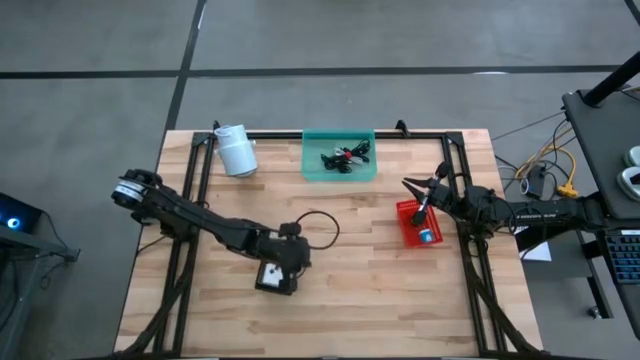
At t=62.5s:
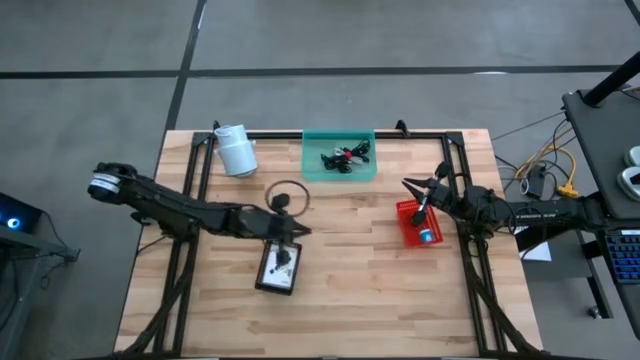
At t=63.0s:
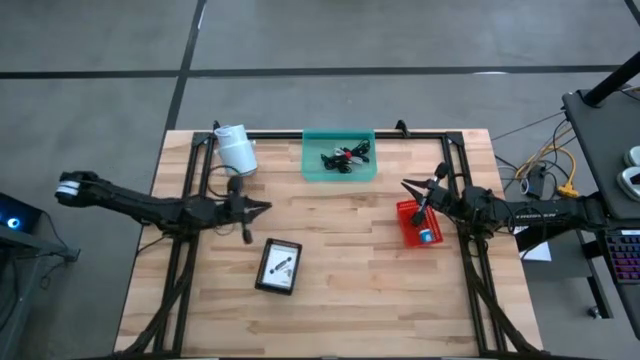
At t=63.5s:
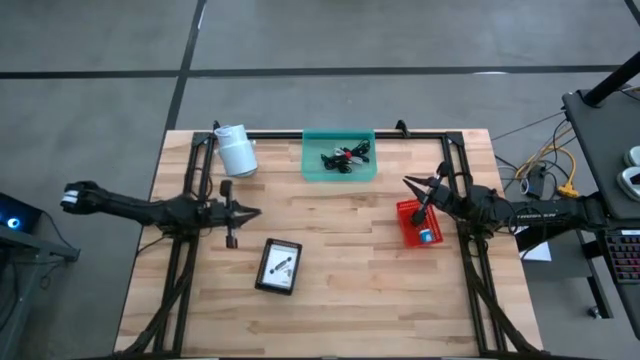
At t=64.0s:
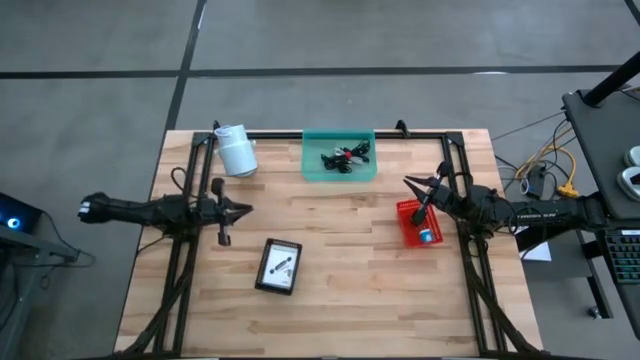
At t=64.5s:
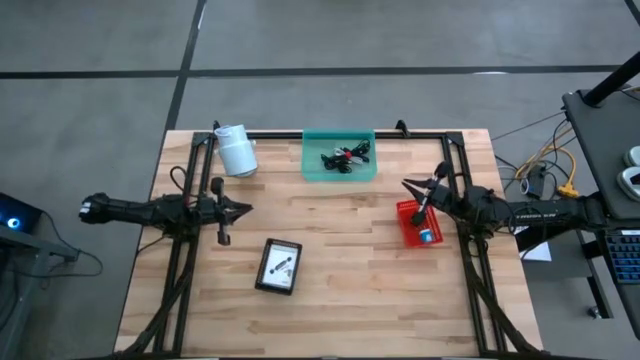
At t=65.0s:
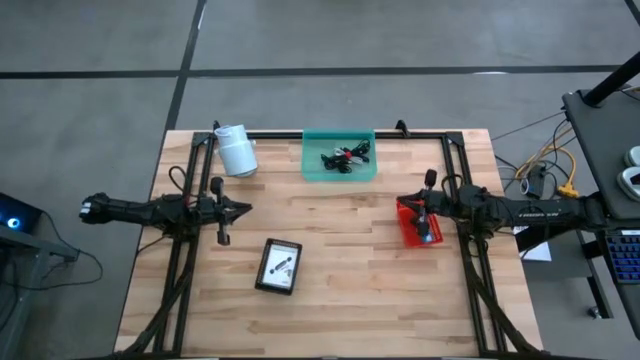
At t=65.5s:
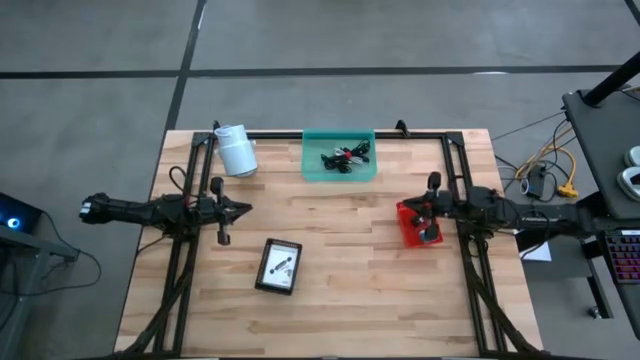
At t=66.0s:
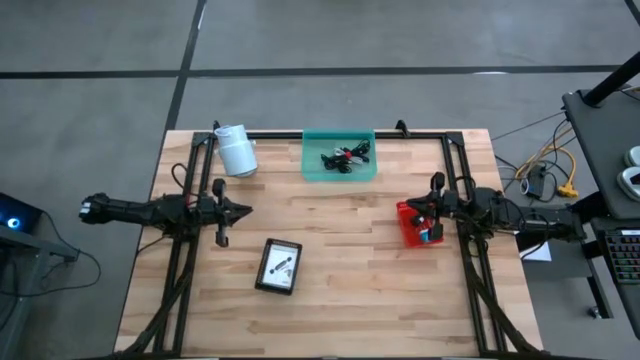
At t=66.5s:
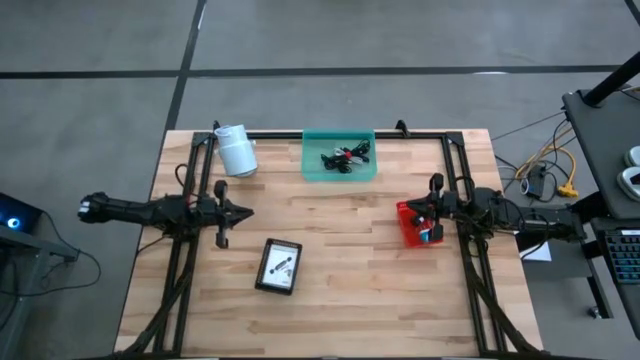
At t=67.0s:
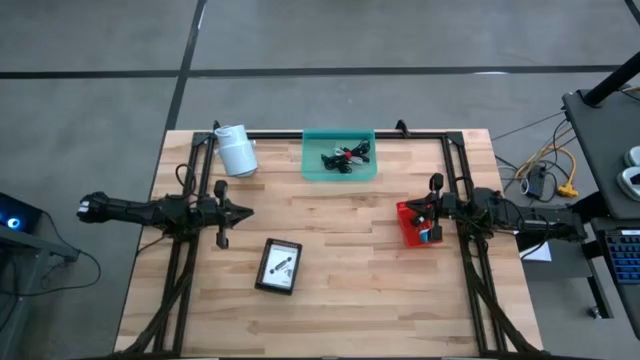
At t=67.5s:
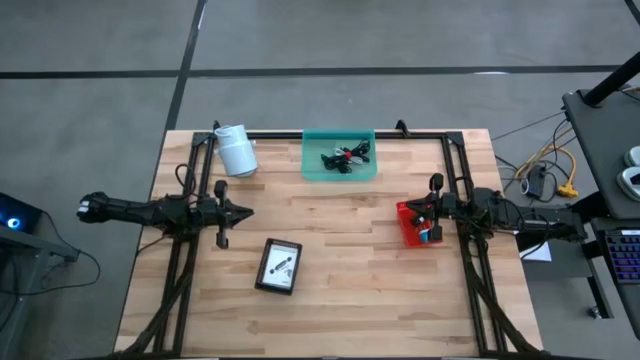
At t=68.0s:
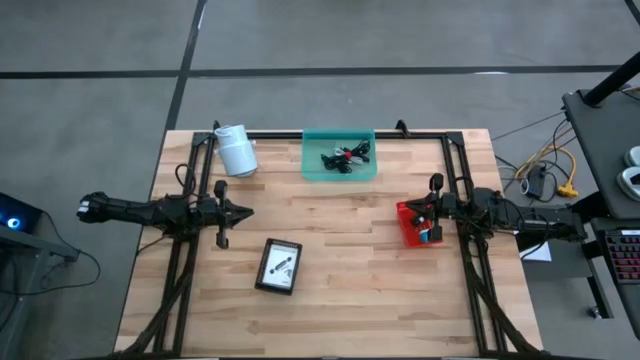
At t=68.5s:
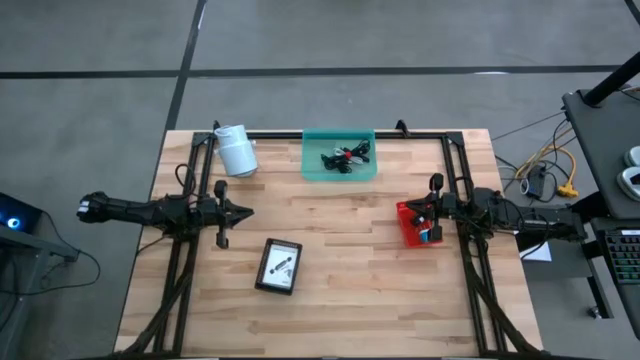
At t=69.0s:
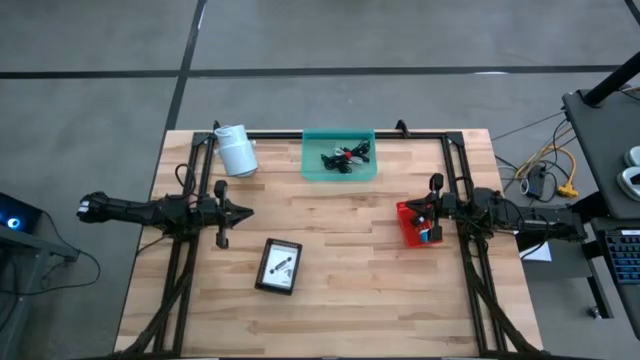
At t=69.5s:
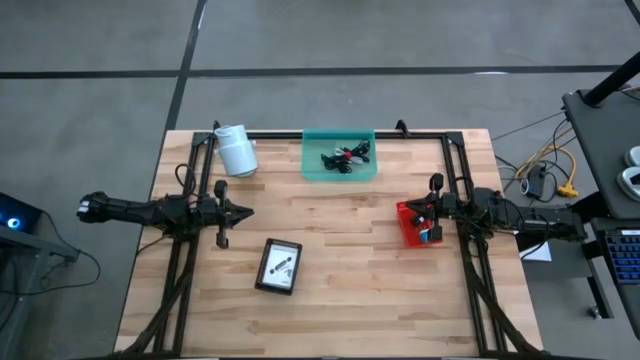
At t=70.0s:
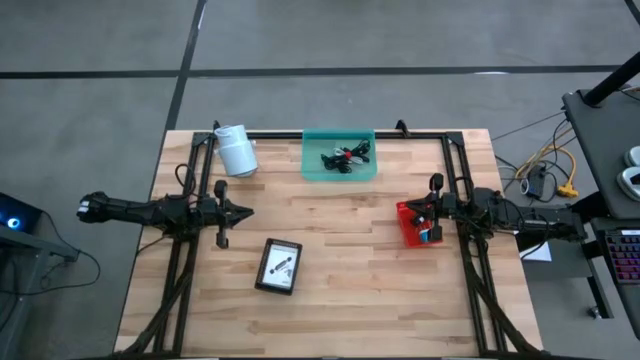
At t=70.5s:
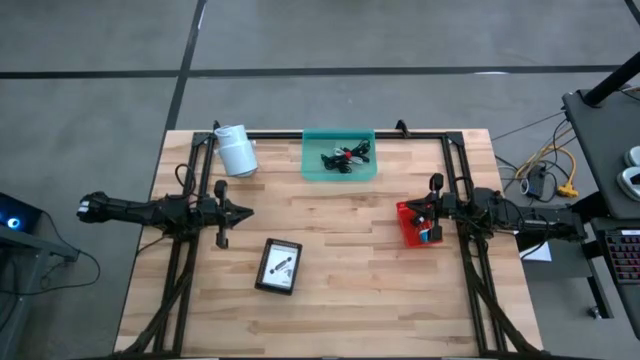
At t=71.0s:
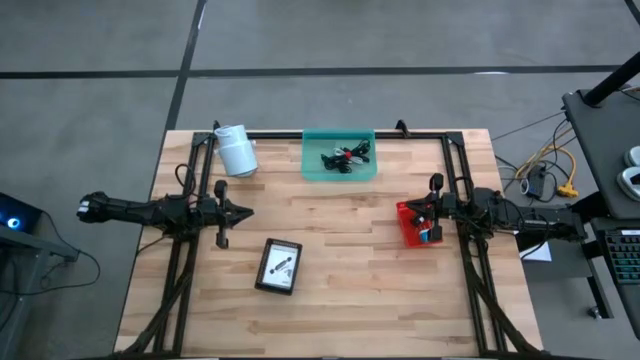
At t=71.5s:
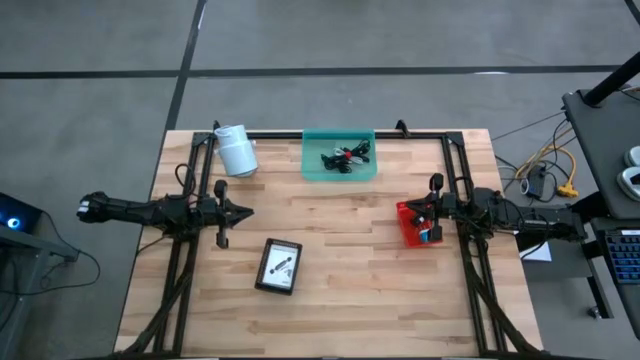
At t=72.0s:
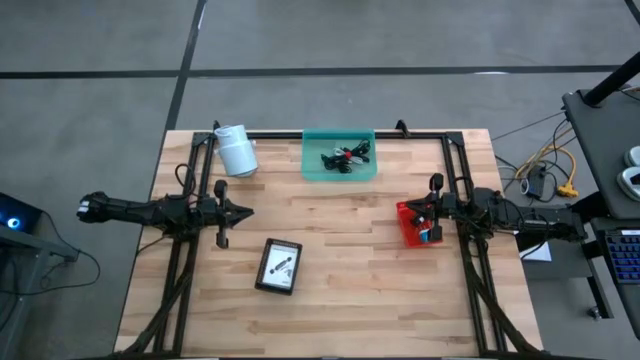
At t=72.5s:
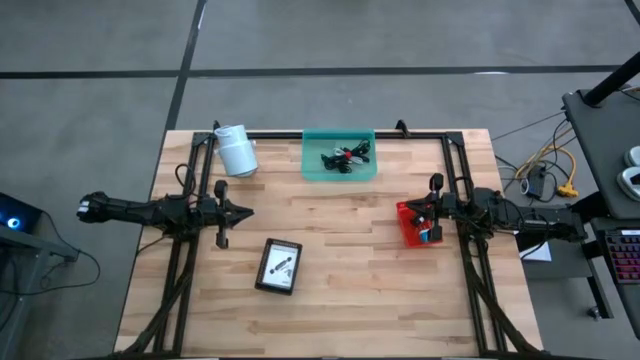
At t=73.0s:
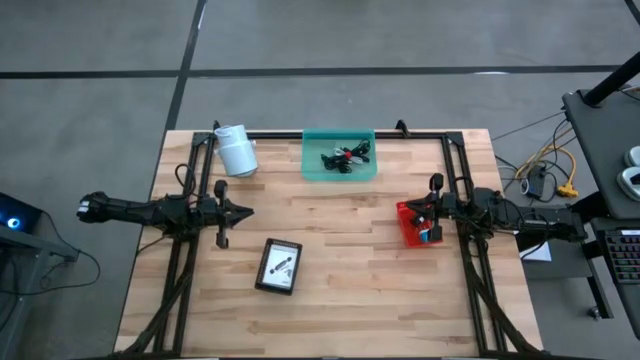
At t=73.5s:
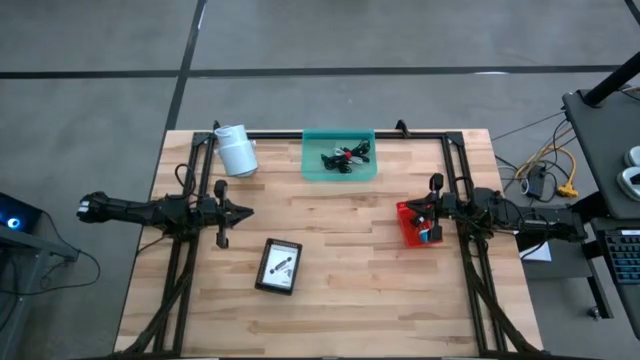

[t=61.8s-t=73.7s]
Task: Pick and place items into bin
Return to Home Position

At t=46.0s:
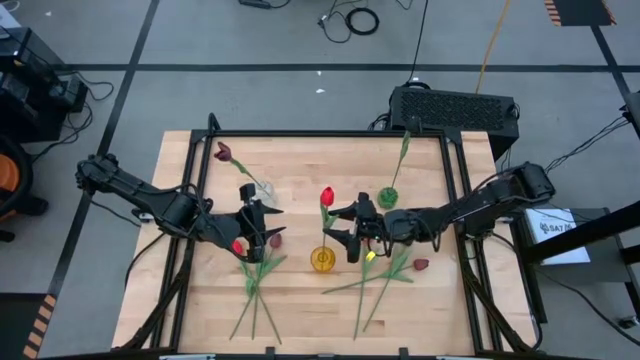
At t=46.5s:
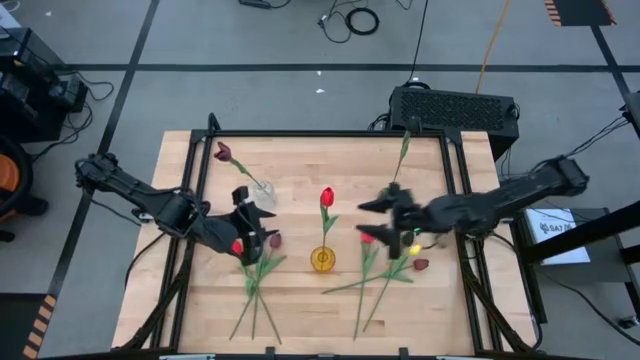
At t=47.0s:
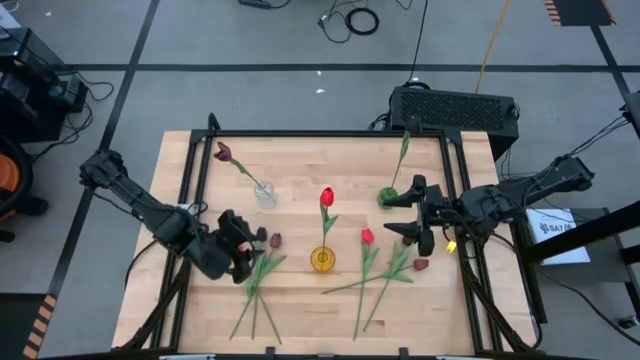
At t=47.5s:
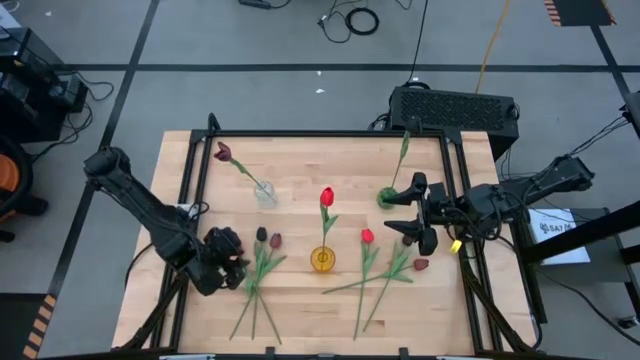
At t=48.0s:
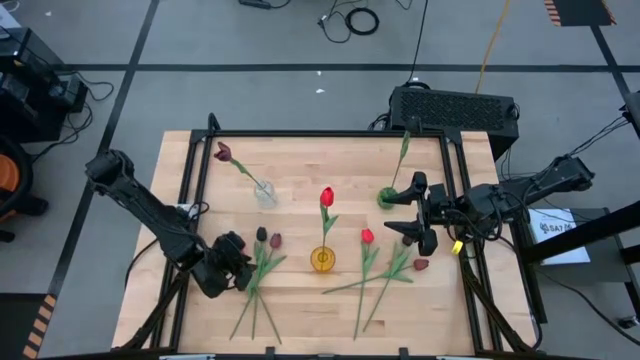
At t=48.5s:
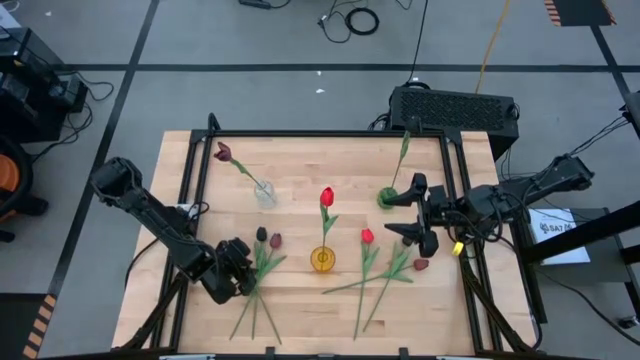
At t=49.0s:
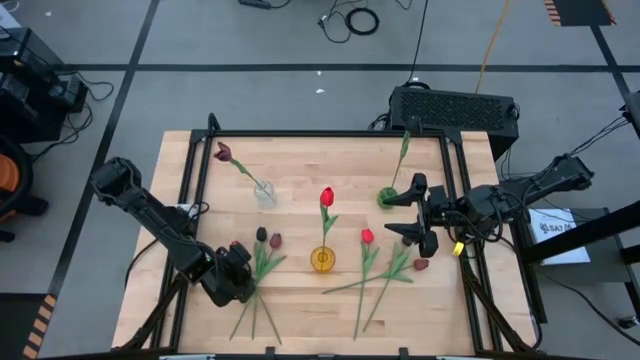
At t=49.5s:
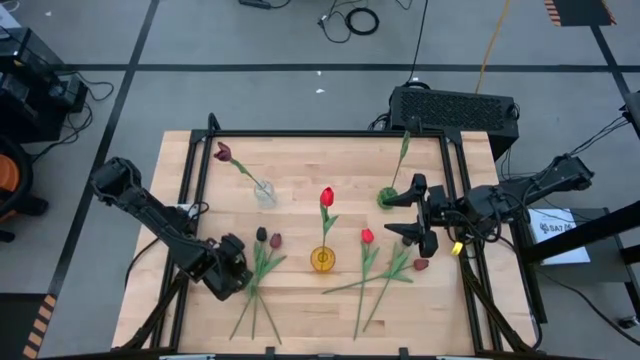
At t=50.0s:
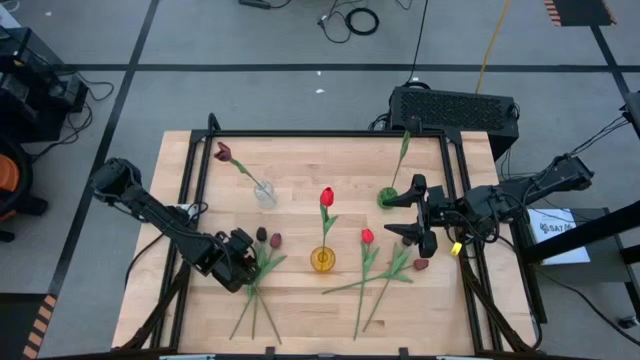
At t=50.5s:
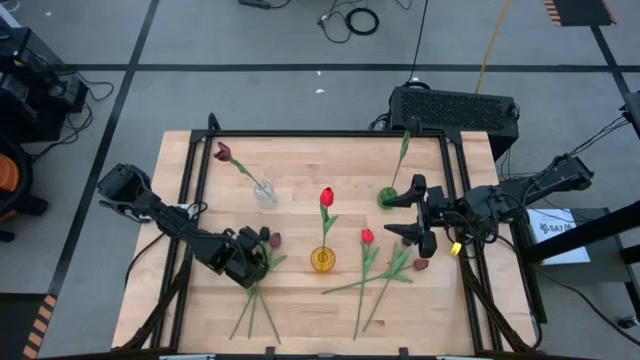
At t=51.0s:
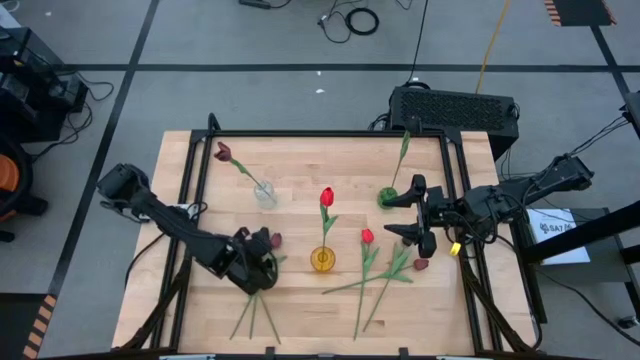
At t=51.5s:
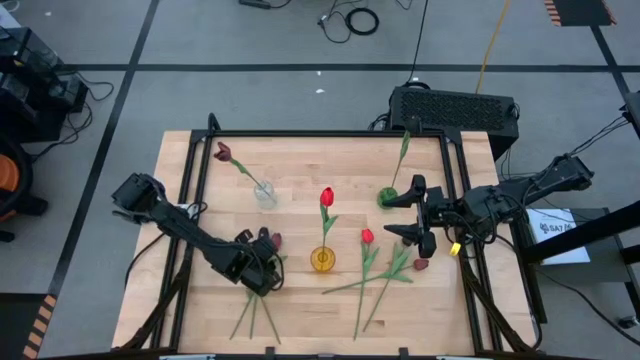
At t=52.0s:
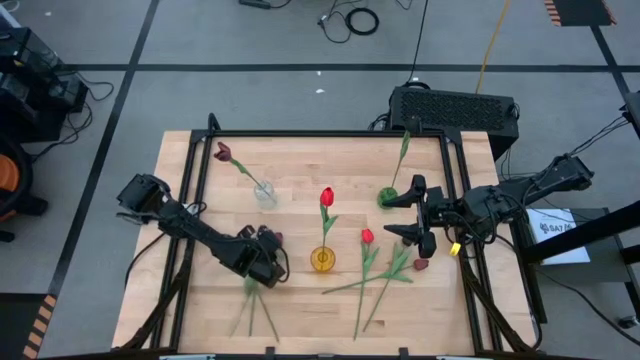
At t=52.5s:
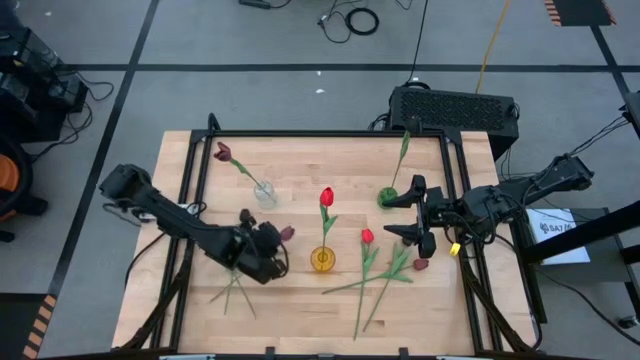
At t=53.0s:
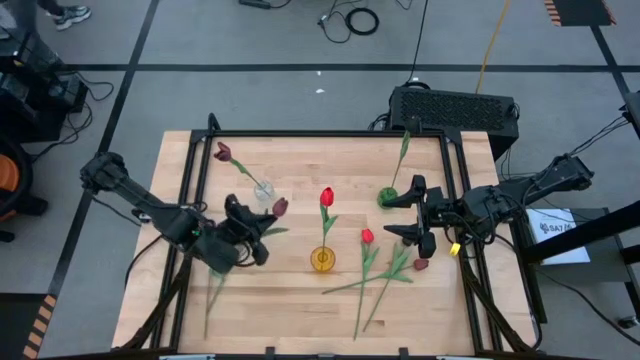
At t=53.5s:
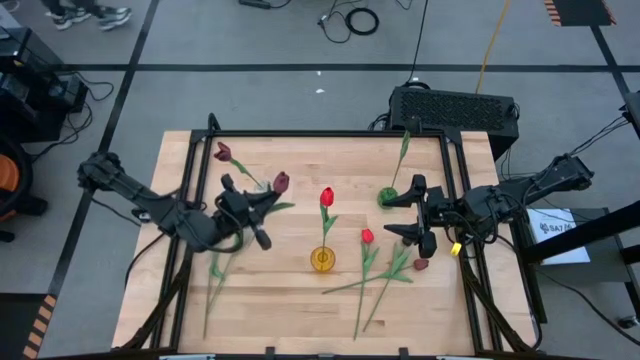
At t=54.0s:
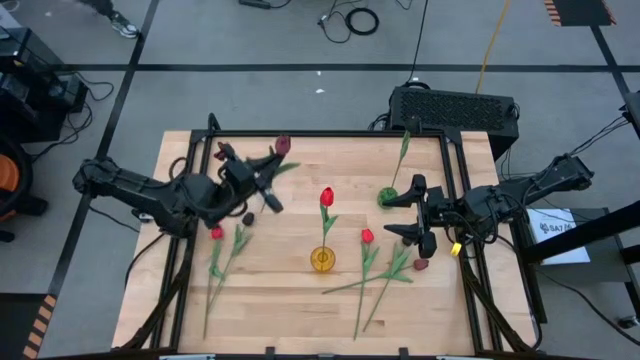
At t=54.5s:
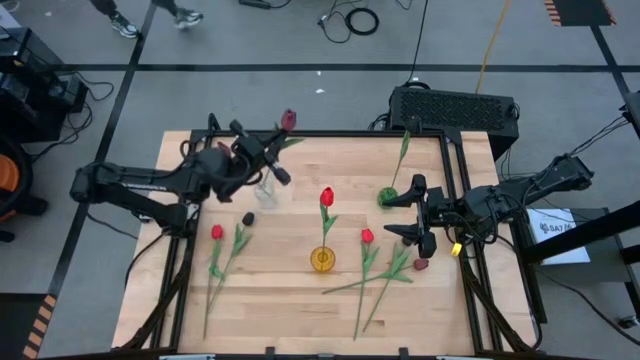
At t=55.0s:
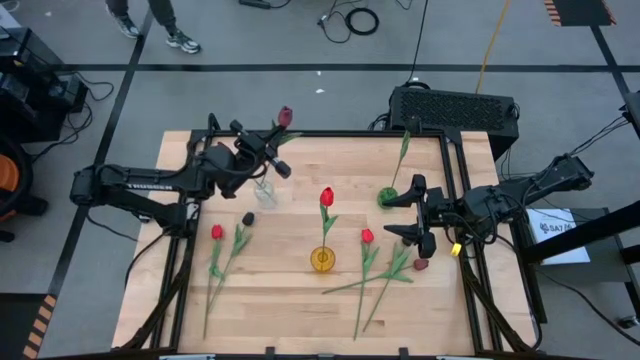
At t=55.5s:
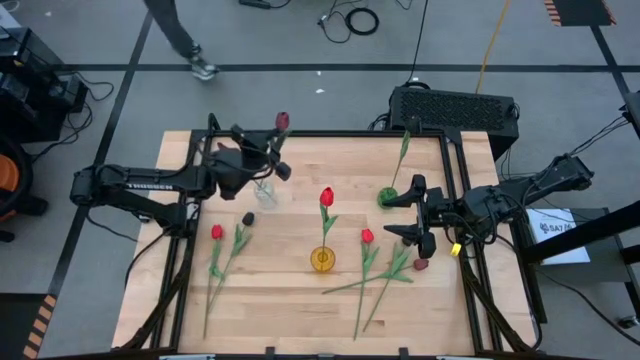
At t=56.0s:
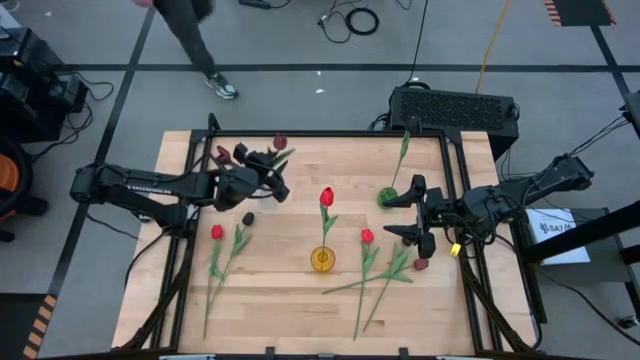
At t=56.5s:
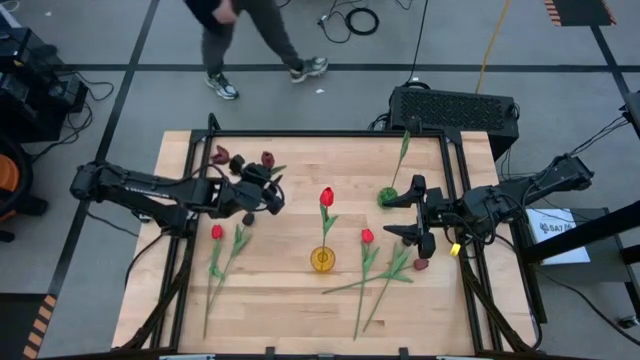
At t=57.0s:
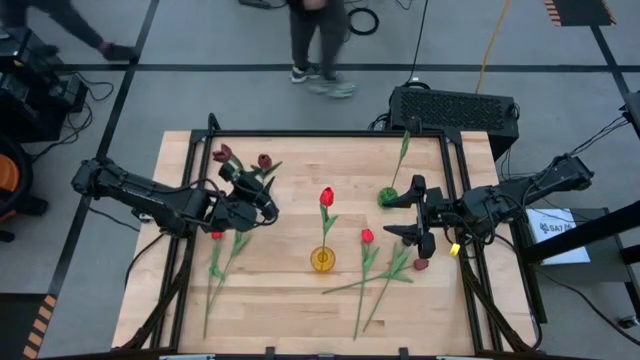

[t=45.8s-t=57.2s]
Task: Sort flowers into vase by color
Put the left dark red flower into the transparent vase
